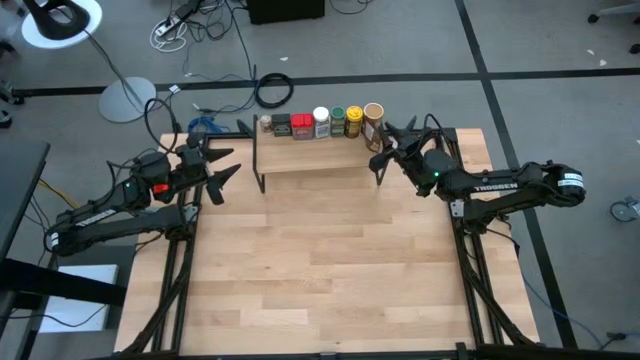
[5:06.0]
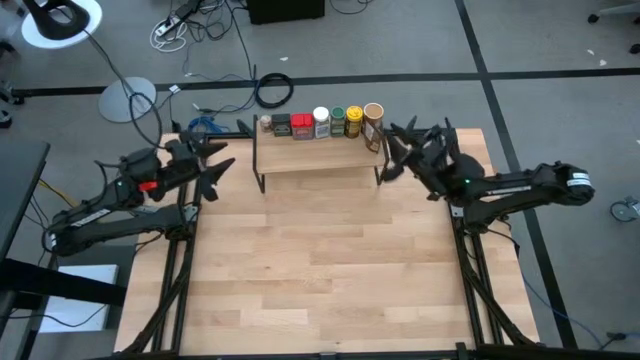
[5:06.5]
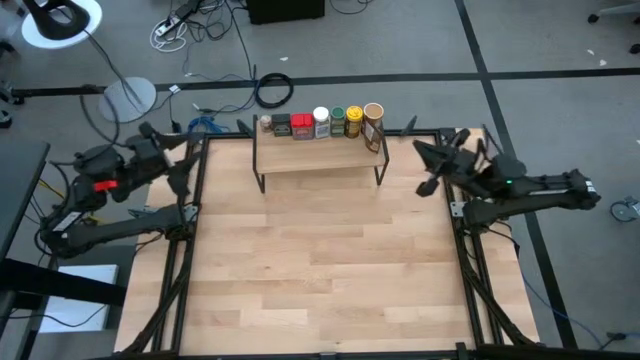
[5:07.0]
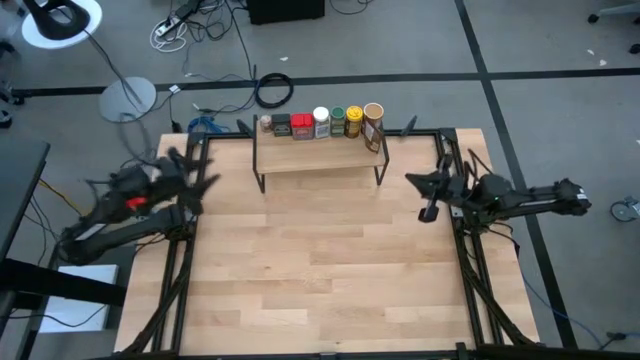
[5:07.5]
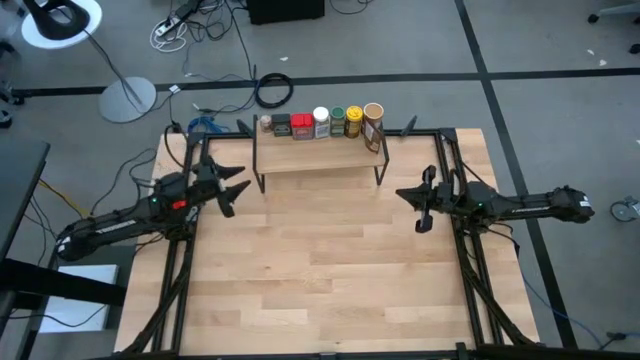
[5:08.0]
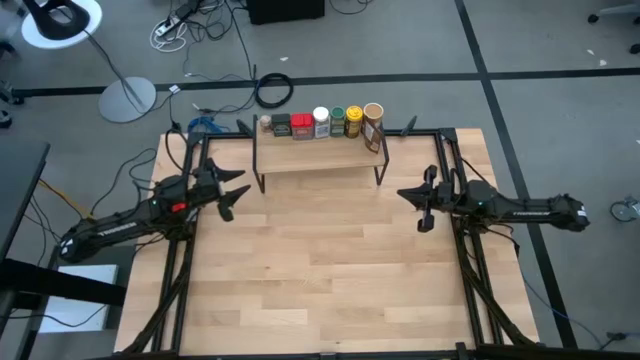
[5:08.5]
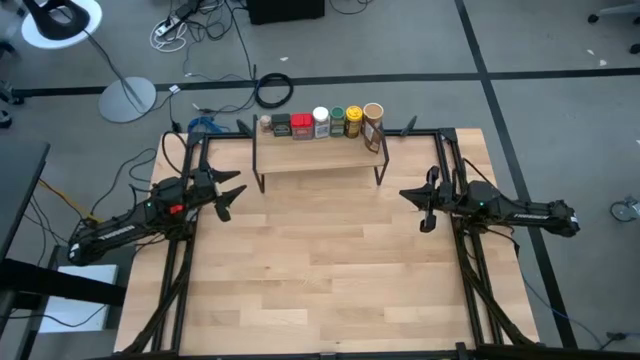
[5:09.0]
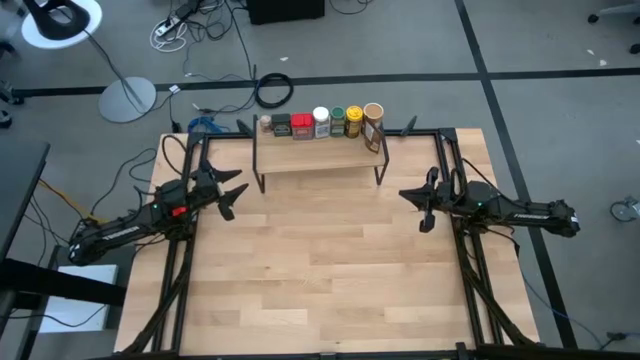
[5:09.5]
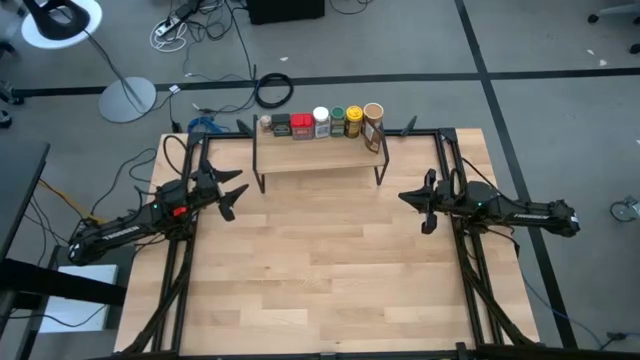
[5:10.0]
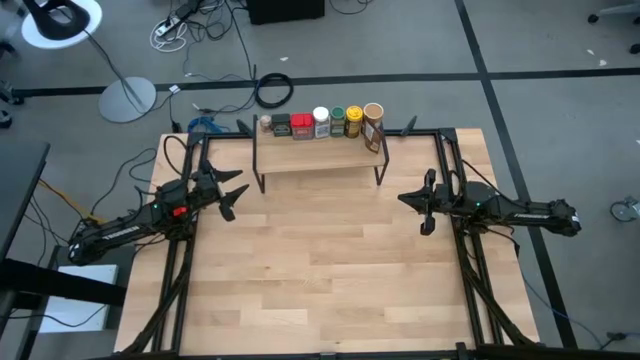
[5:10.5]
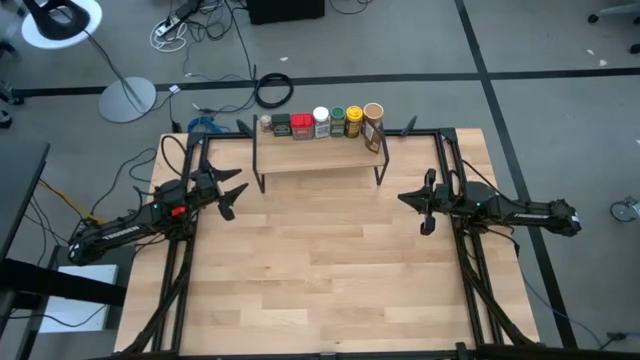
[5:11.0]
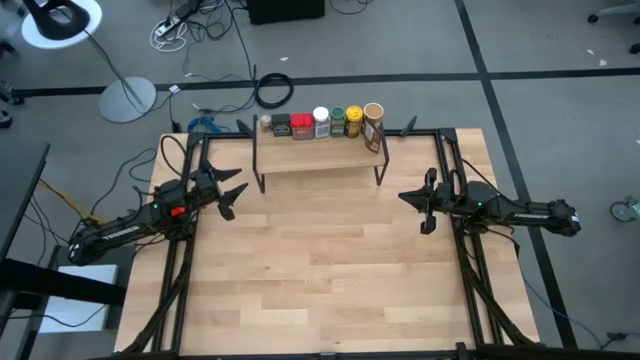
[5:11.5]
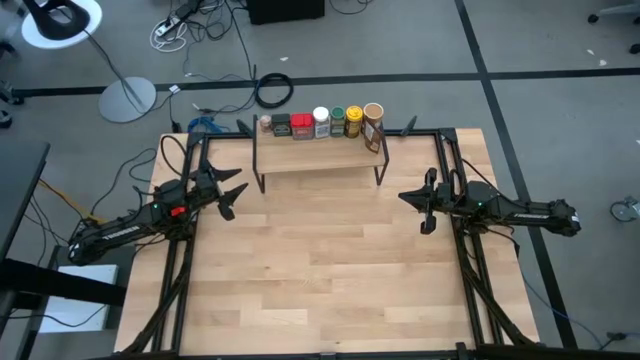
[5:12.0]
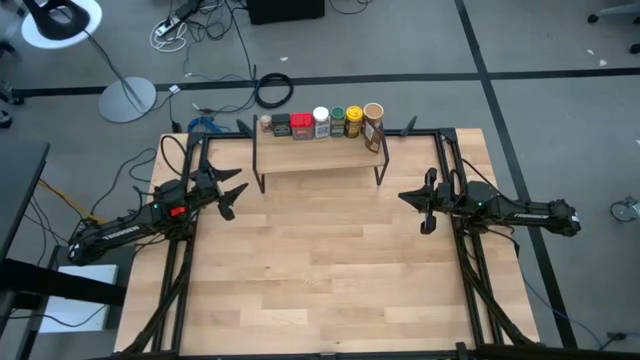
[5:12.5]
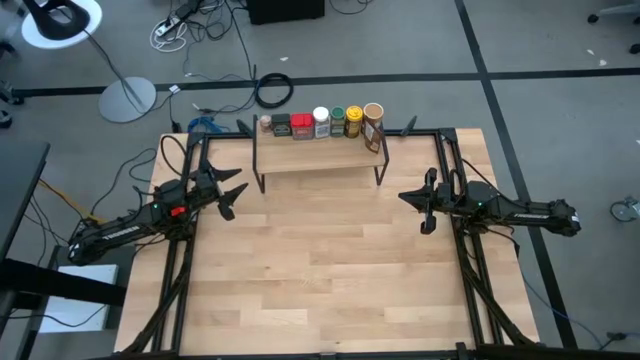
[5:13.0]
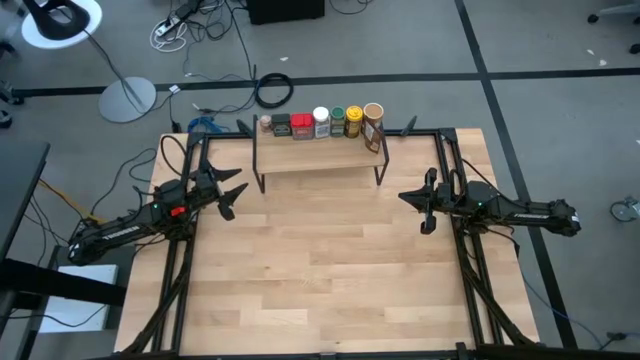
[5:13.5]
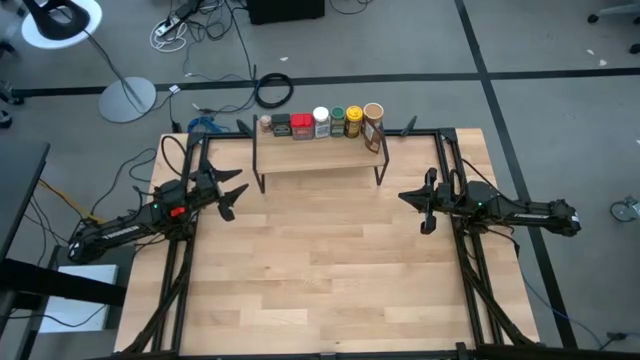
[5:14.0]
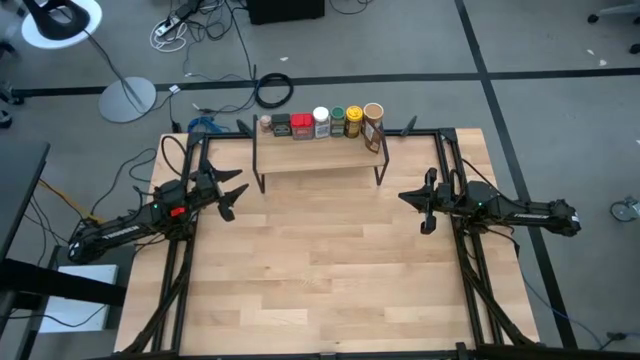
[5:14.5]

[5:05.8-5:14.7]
Task: Shelf spices
Return to Home Position

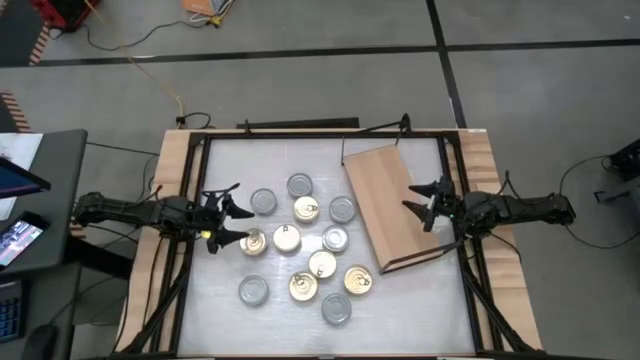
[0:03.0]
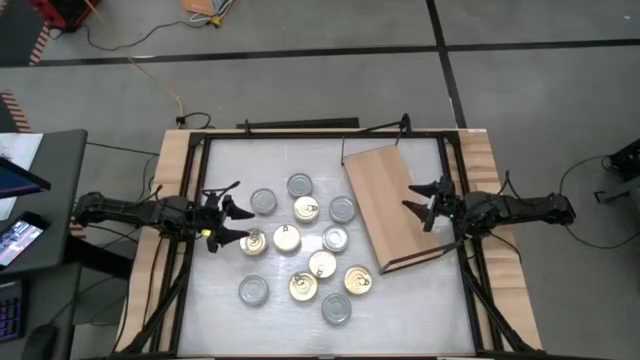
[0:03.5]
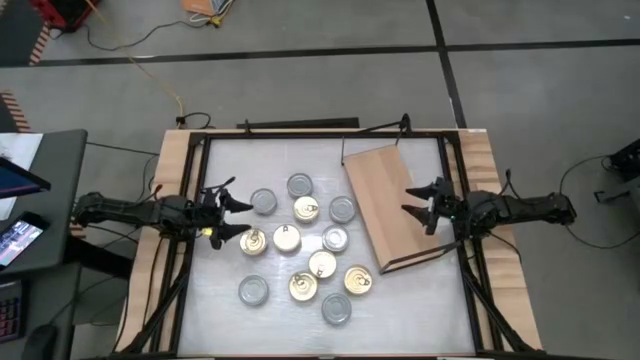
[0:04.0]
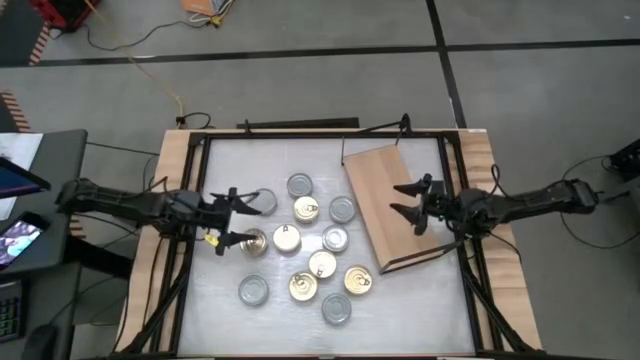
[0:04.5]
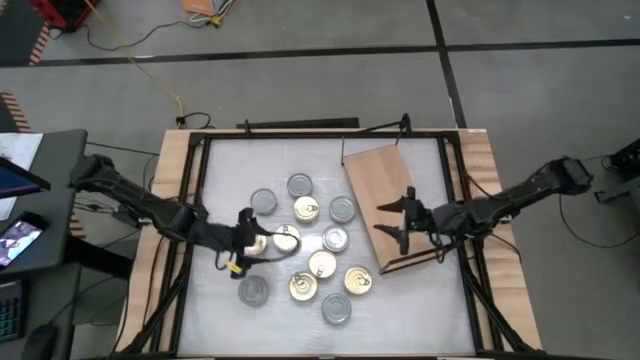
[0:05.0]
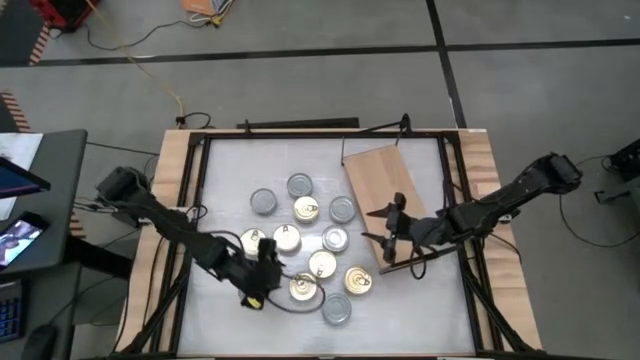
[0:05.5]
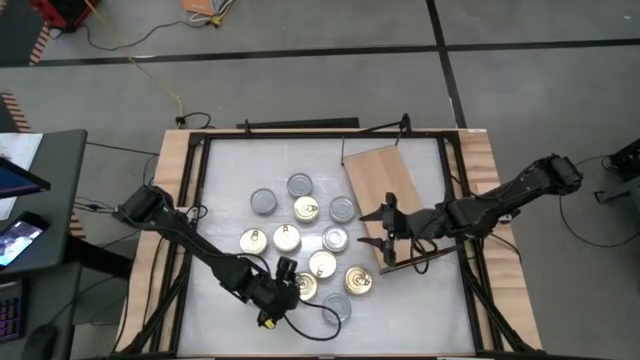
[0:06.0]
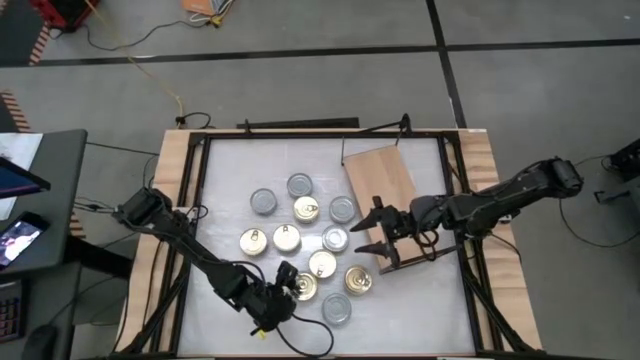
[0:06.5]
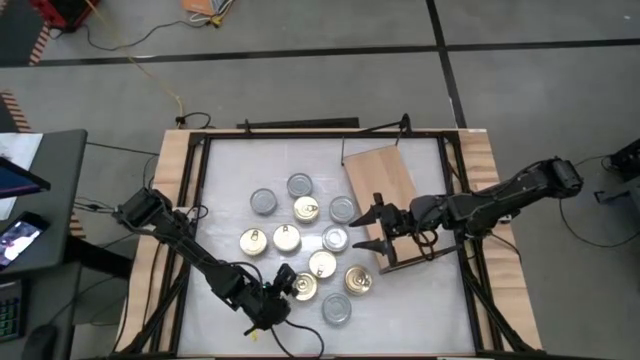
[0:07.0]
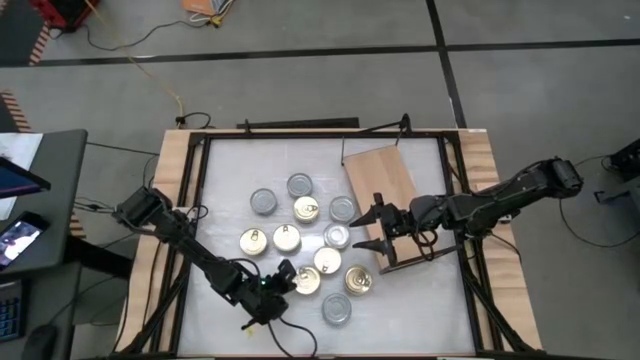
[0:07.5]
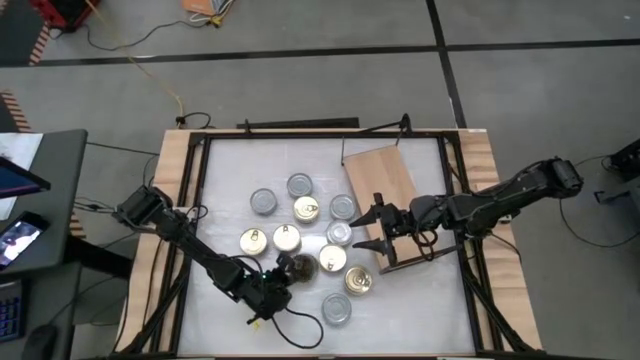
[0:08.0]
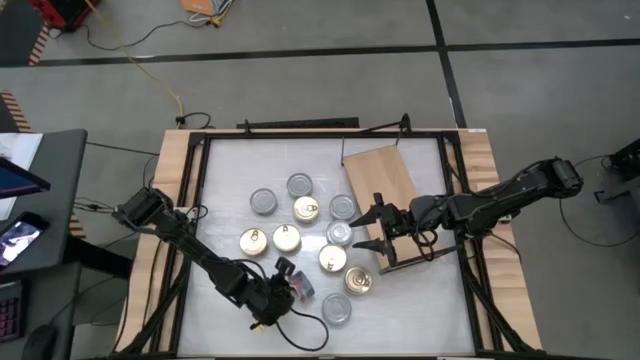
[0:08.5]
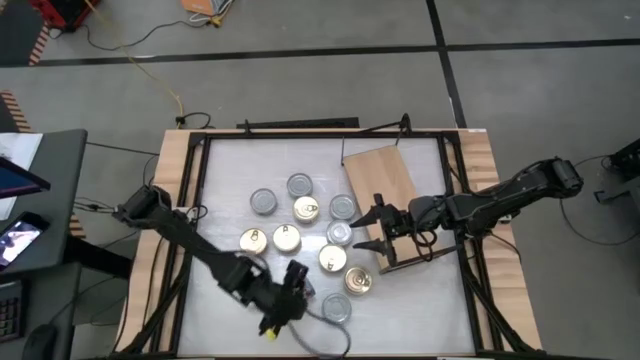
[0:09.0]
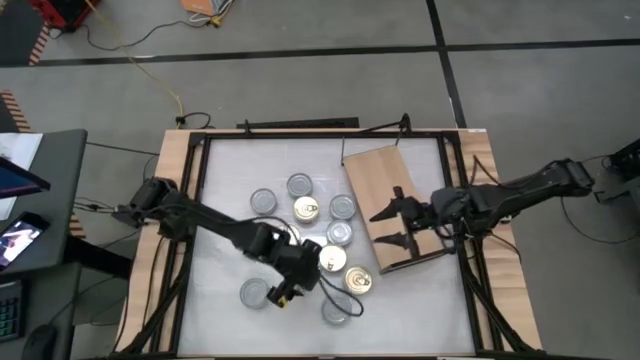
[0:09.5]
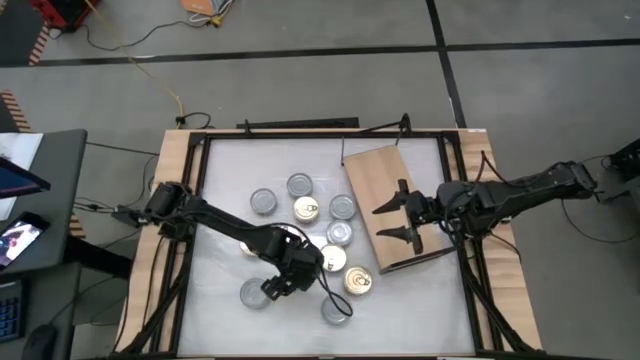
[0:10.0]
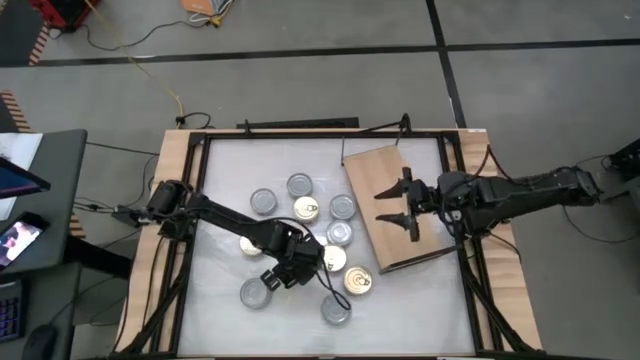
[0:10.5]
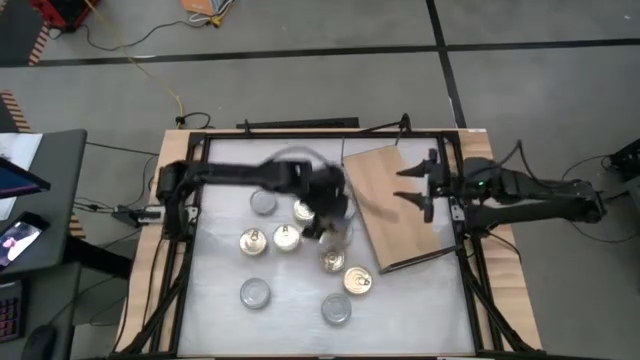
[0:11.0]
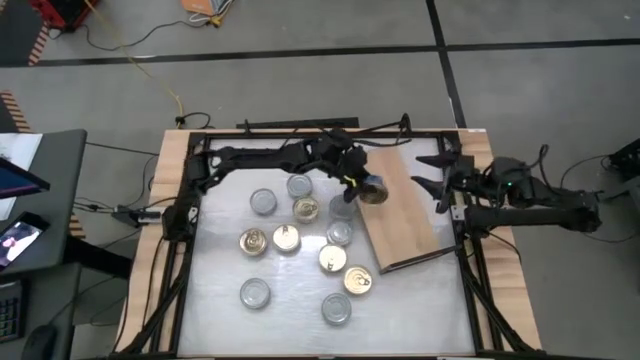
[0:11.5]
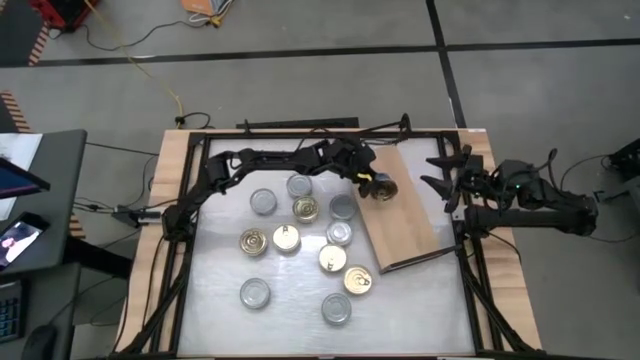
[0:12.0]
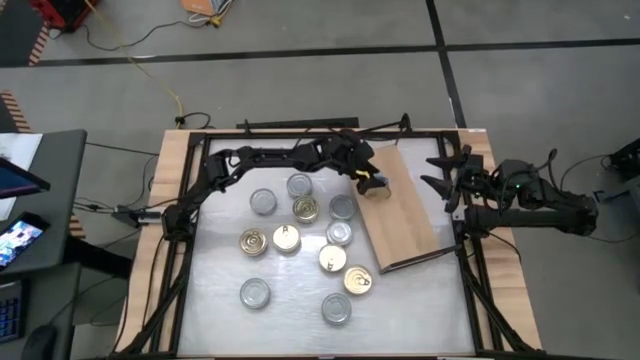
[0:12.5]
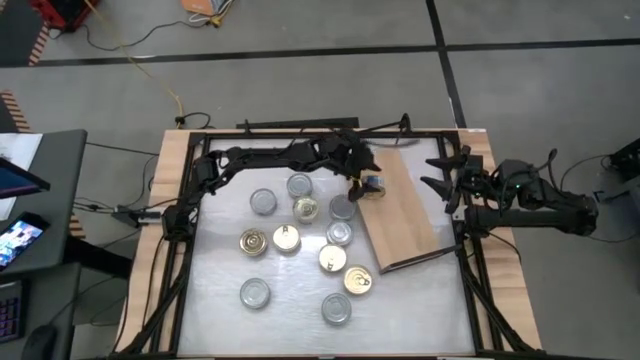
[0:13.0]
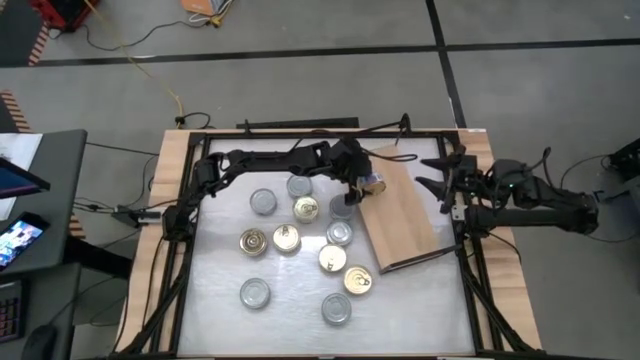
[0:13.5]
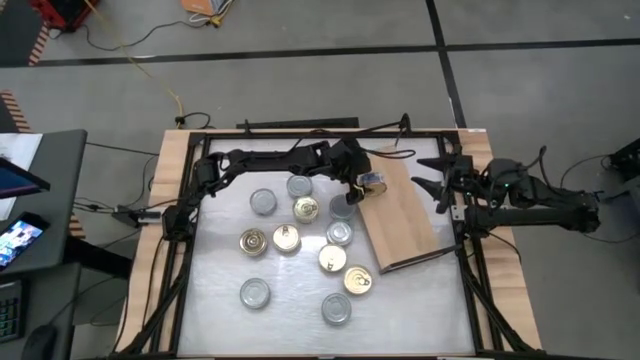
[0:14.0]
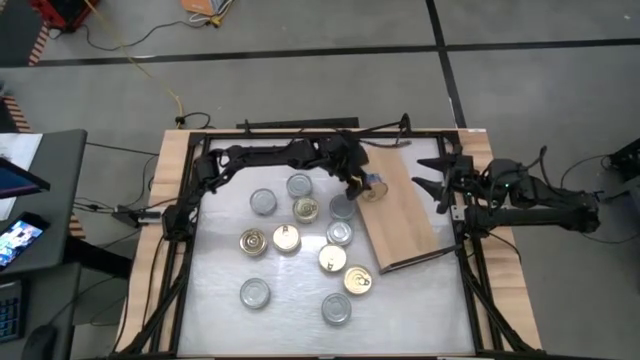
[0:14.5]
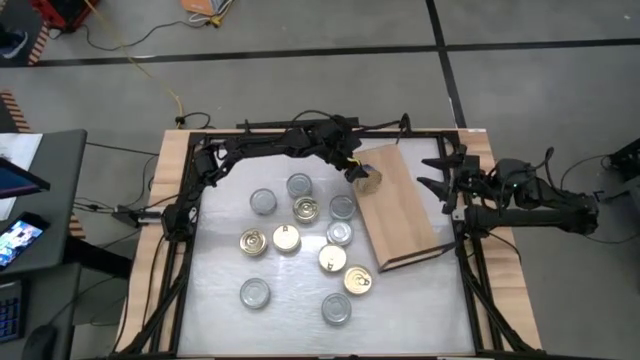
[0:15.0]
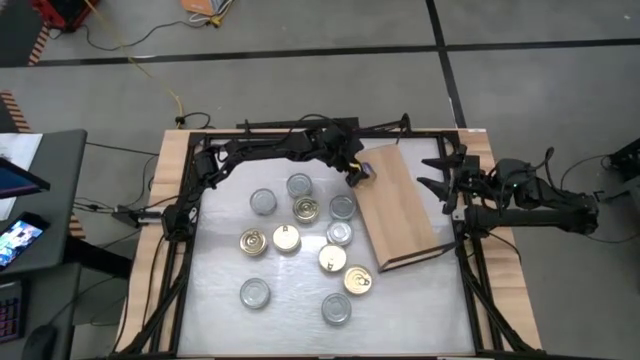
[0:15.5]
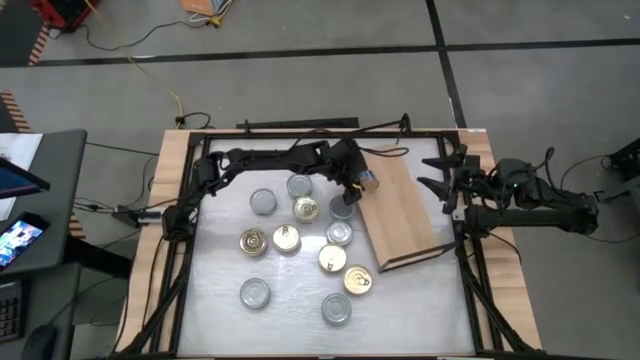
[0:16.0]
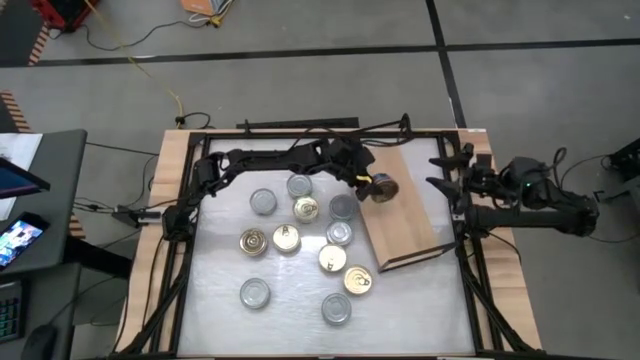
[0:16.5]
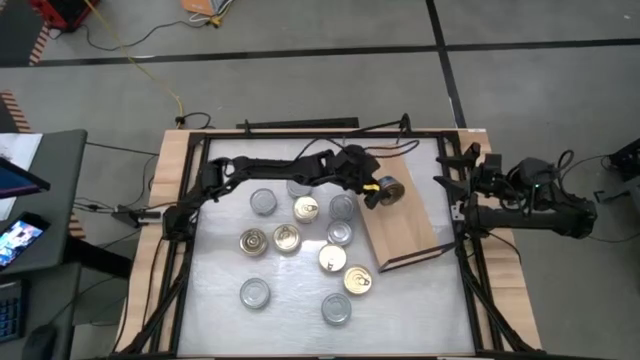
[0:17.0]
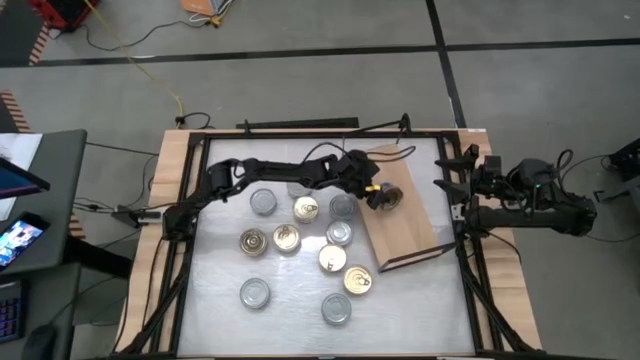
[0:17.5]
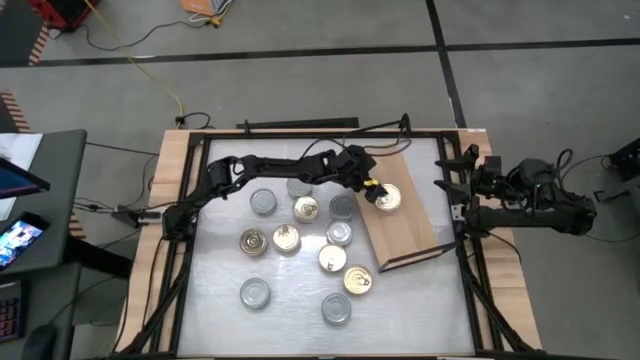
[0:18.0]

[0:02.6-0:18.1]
Task: Stack canned seafood by type on shelf
Put the blue tuna can on the shelf
